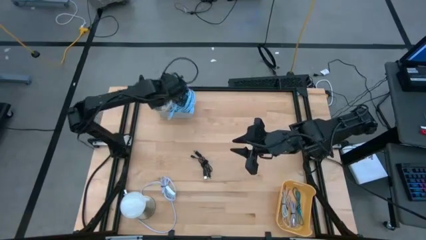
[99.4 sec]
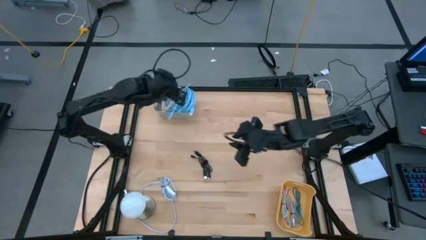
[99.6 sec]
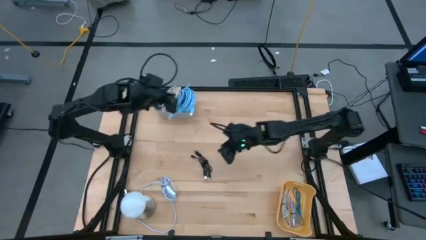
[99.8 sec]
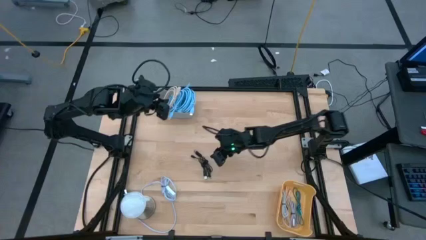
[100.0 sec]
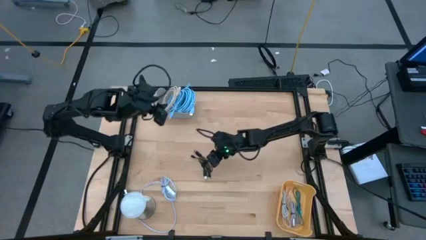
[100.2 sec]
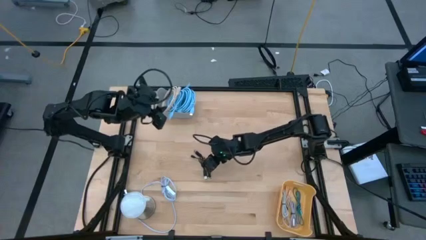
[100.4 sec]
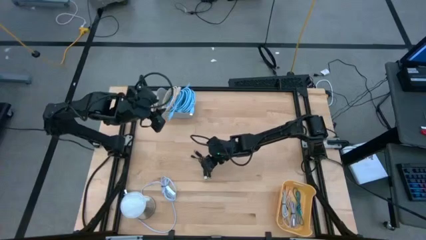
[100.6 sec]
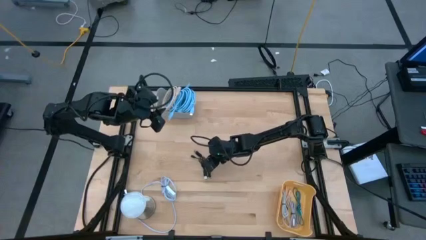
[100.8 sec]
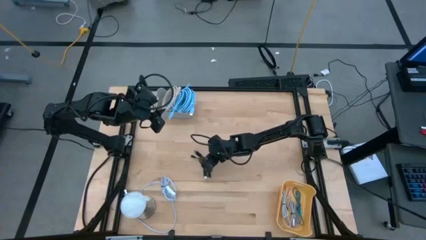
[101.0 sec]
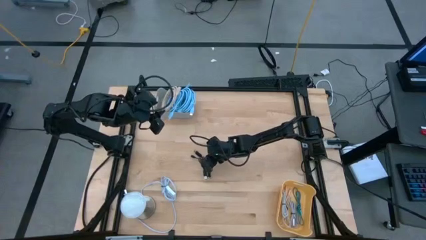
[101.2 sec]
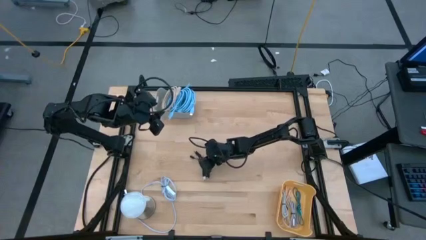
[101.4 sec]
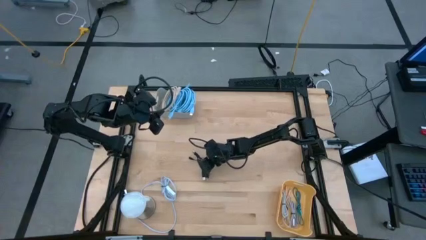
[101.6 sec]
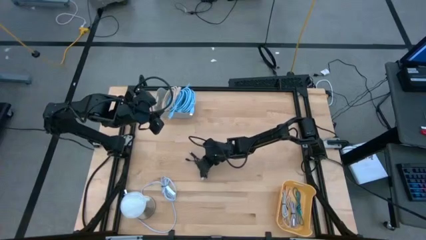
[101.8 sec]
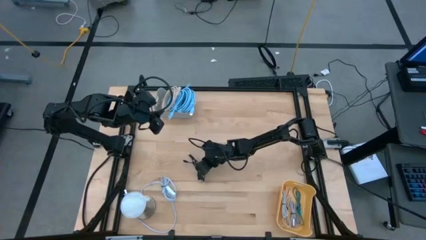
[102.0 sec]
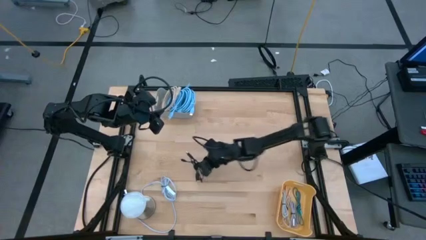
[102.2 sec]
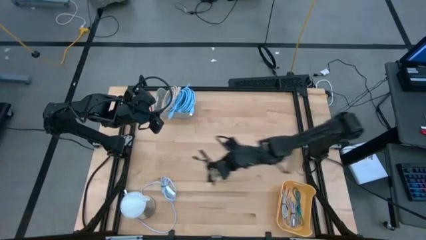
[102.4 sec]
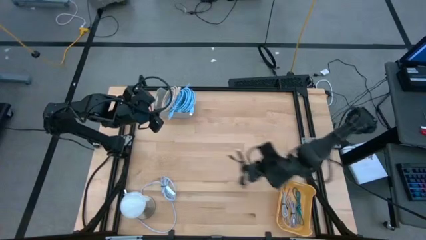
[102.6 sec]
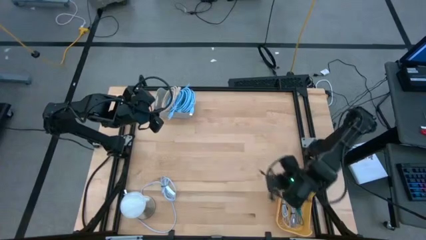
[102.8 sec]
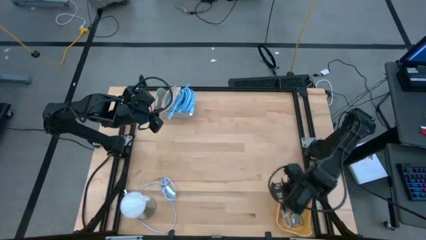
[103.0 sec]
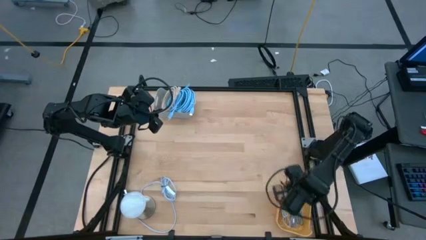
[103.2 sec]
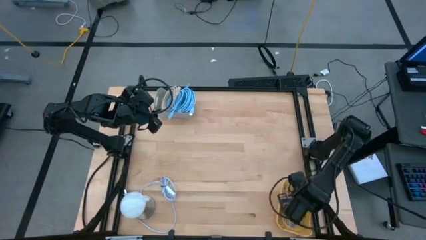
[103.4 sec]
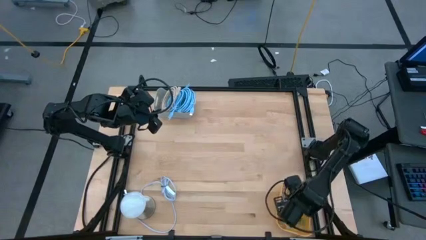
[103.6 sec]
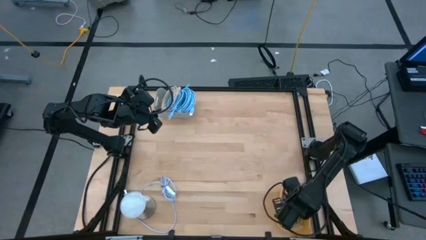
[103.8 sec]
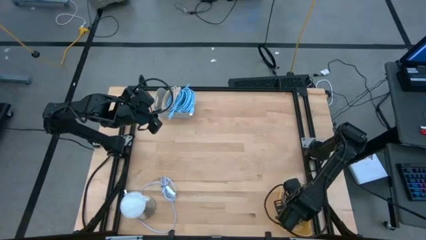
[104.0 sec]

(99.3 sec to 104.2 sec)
Task: Pick & Place USB Port
Put the black charger cable into the yellow bin

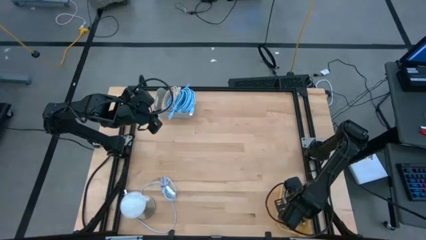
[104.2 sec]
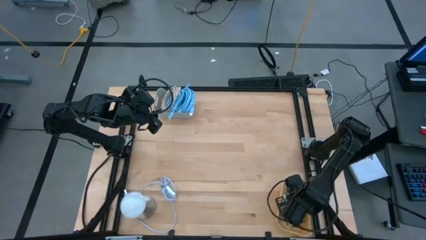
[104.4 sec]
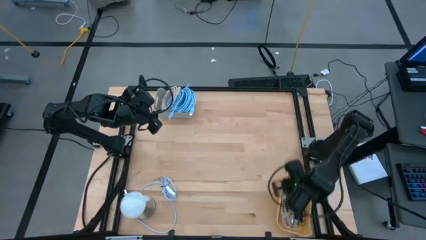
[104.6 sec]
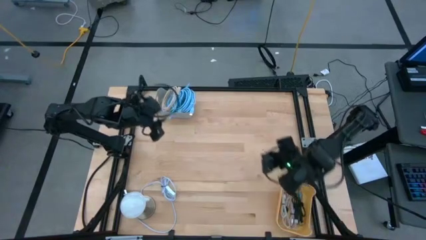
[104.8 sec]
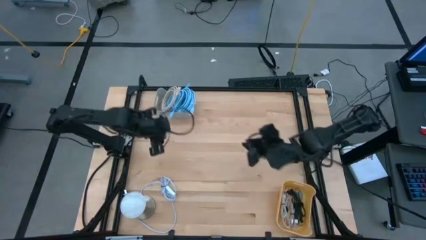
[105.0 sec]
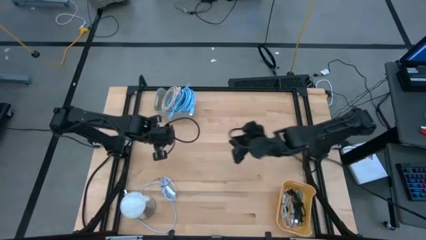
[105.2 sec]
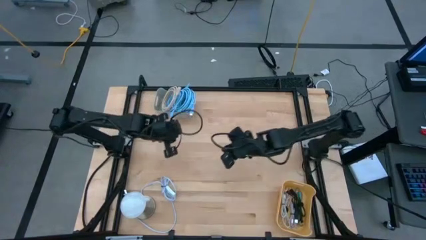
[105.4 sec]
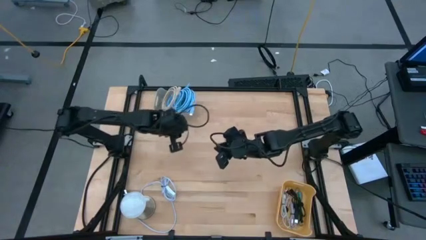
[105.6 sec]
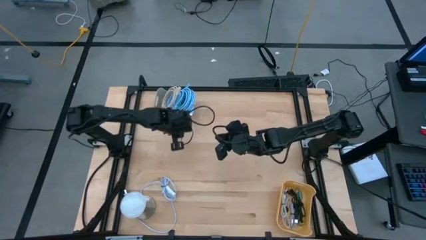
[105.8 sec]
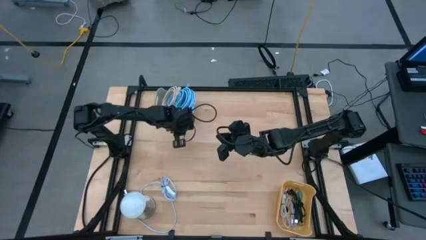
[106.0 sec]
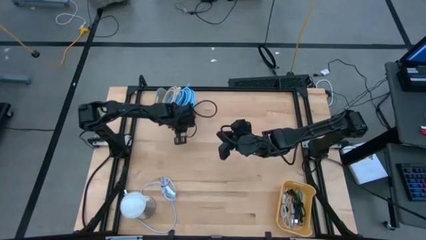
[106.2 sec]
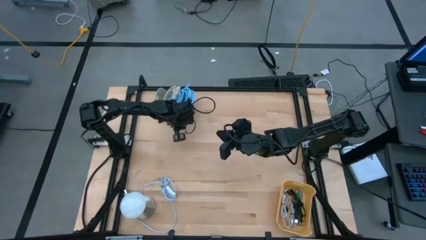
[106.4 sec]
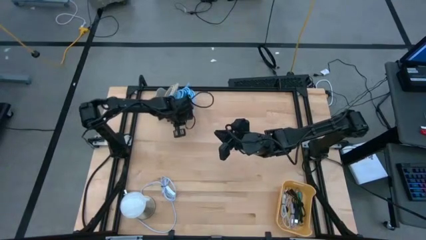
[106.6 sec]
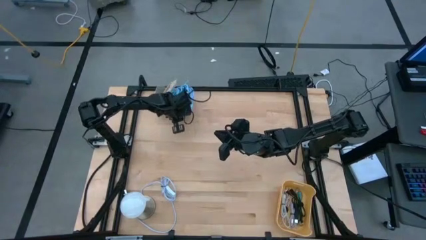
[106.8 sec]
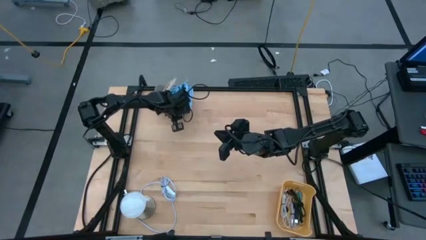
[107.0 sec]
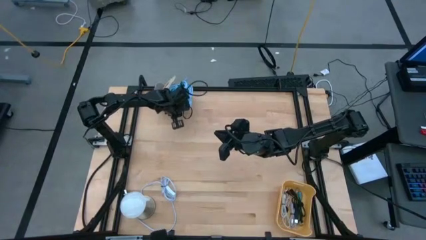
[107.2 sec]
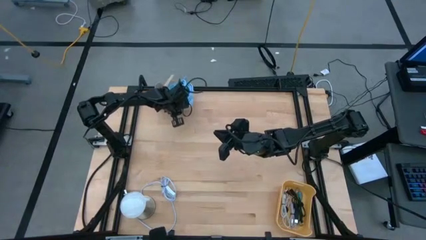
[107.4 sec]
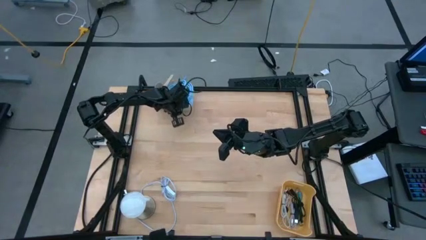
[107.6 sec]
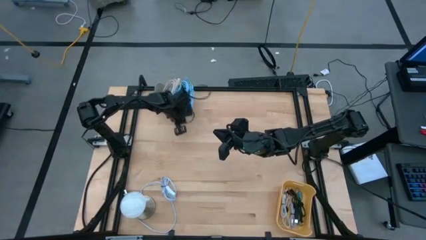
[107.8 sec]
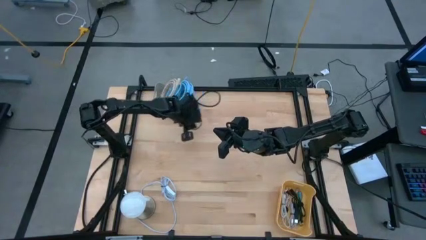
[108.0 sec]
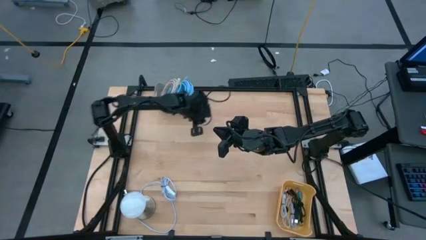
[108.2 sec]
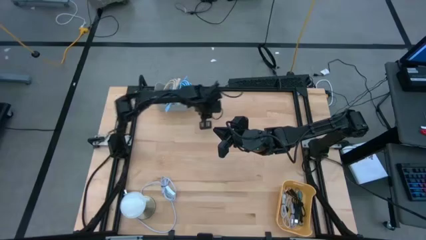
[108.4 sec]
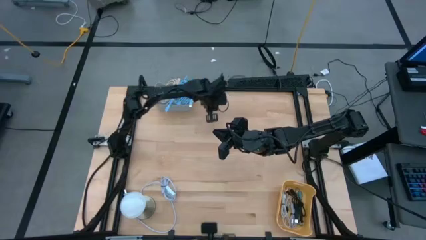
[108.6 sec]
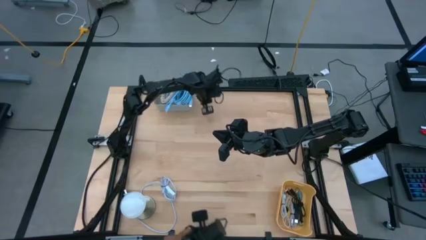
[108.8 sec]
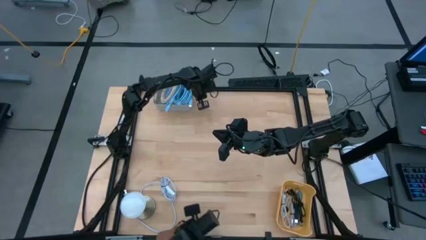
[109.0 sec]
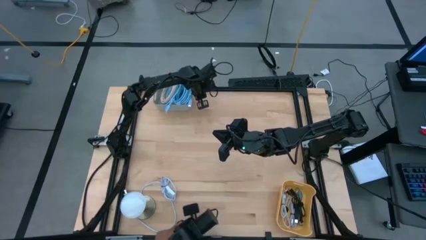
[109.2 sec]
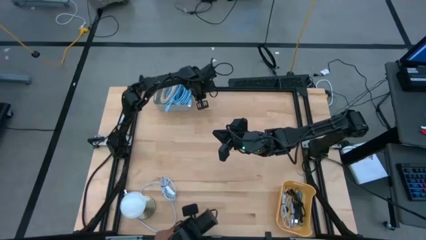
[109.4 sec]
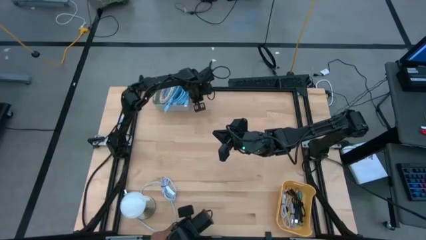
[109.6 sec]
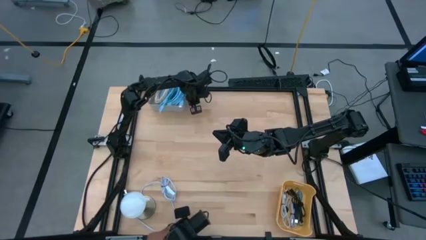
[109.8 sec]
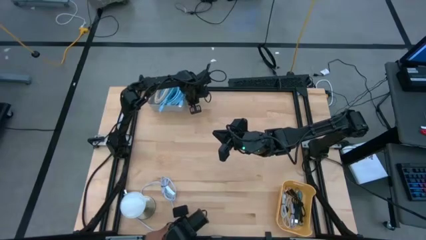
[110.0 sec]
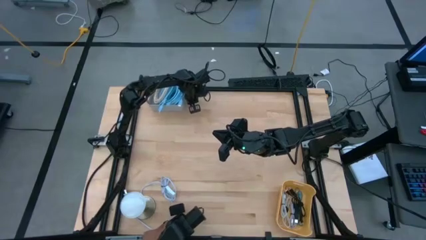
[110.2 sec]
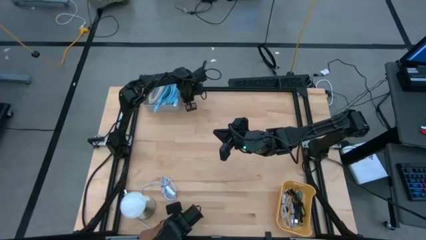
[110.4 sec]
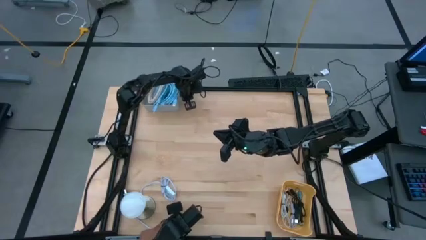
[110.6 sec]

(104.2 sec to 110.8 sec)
Adjust the gray bin

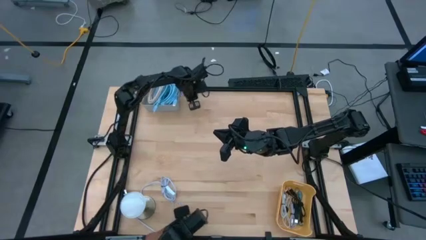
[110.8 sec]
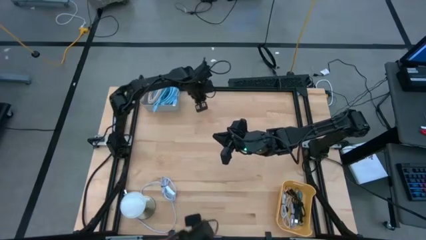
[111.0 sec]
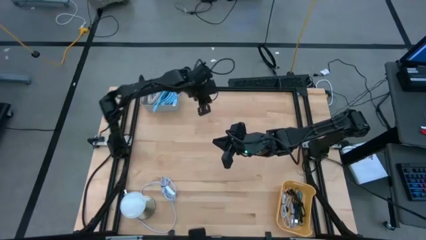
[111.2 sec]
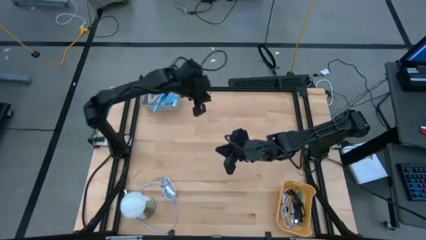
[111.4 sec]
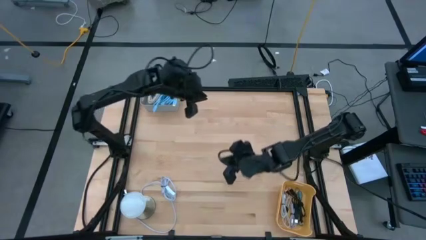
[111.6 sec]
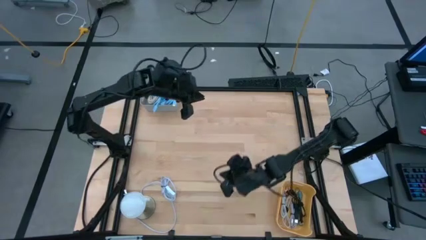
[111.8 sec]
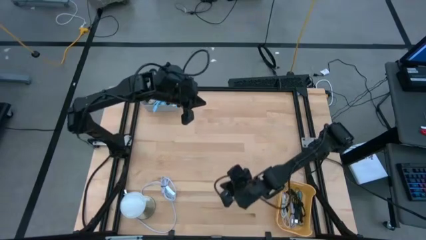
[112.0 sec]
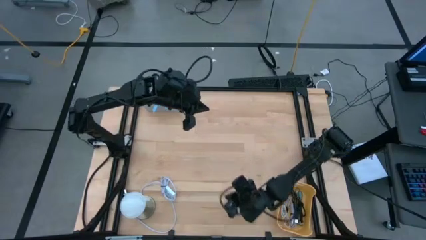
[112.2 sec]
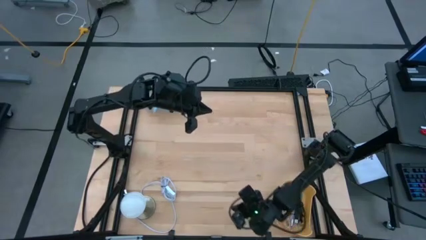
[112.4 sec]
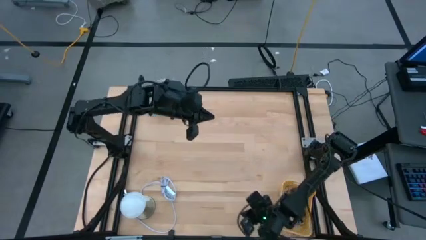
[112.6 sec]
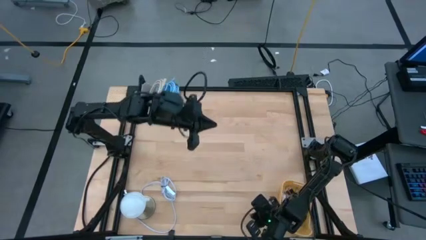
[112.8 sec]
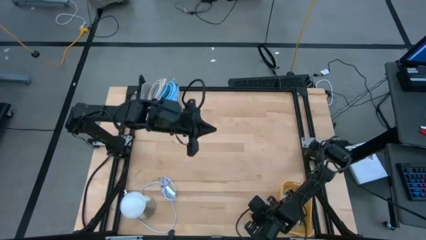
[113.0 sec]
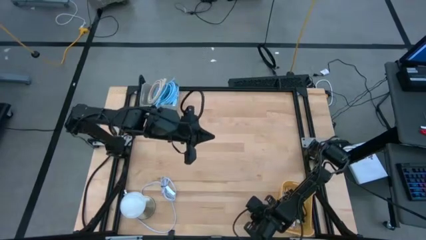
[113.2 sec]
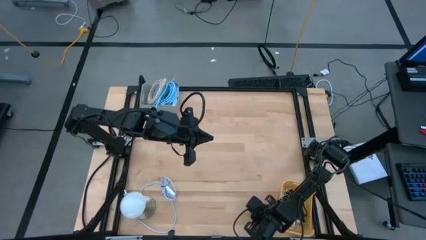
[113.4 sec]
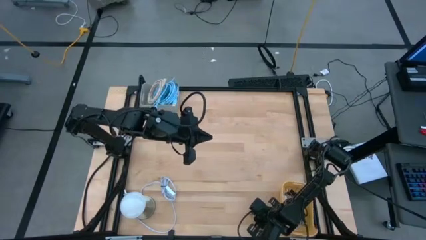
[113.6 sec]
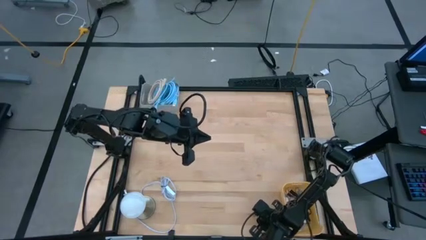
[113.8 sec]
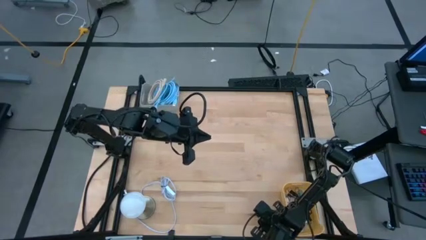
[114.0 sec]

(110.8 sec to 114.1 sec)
Adjust the yellow bin

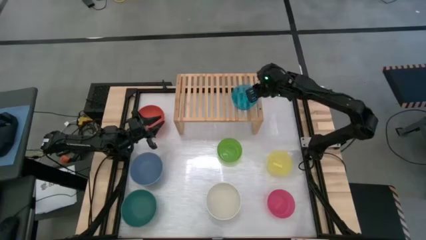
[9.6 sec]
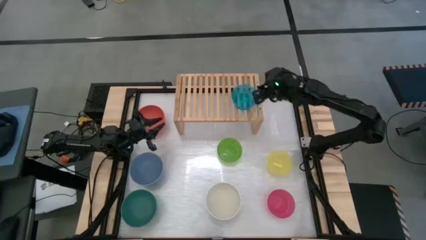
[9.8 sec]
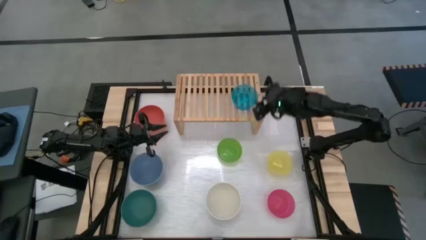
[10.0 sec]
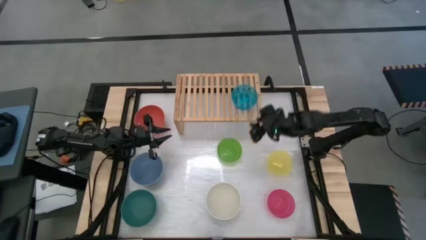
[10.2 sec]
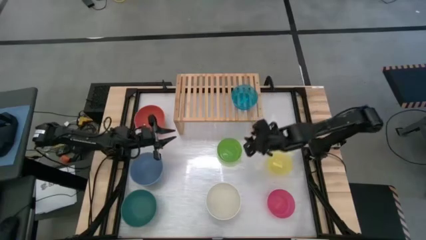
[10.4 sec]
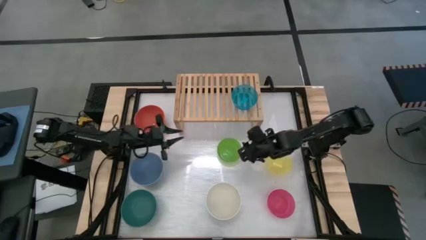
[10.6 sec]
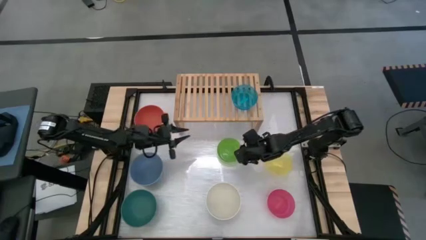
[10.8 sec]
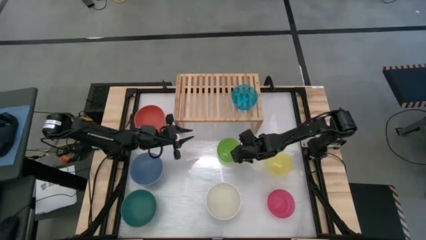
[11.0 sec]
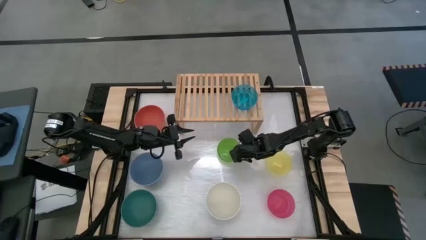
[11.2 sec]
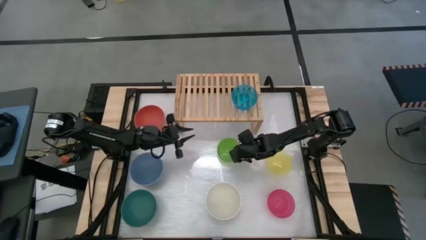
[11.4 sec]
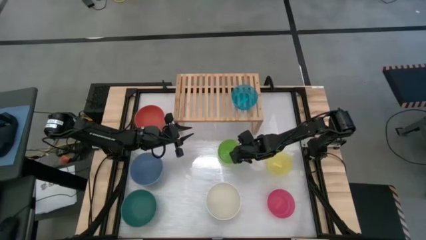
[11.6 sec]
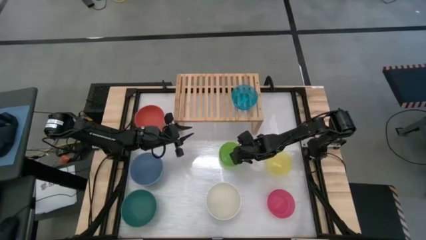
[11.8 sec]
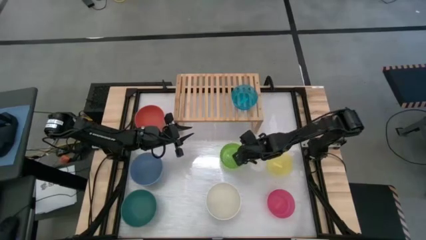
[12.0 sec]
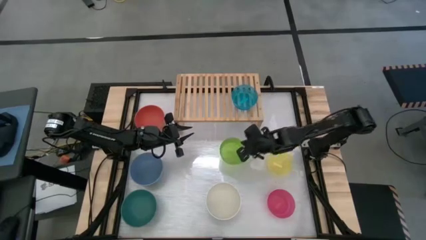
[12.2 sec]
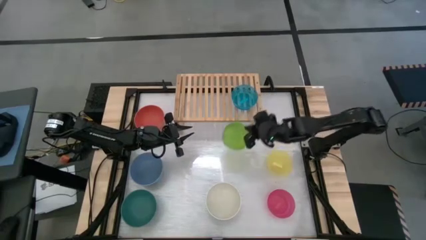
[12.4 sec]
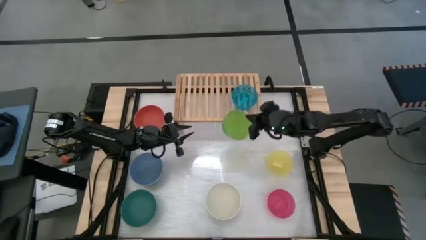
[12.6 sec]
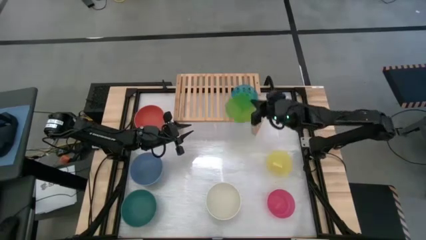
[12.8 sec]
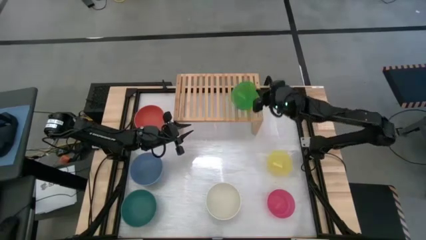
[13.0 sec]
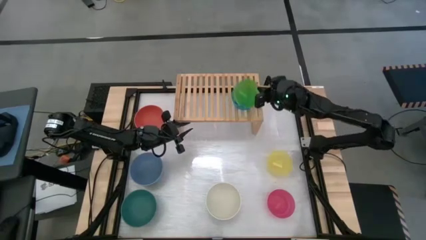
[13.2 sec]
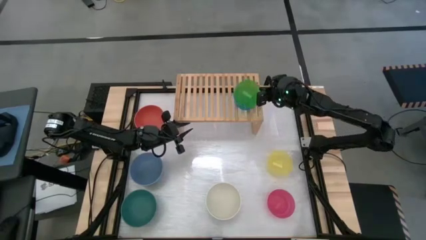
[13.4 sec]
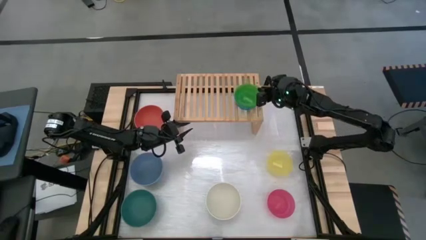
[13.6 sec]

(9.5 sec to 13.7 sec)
Task: Place and stack bowls onto a shelf
Stack the green transparent bowl on top of the blue transparent bowl
